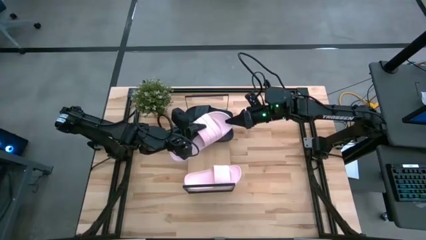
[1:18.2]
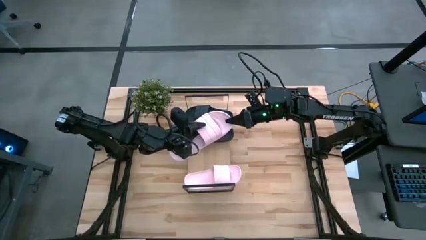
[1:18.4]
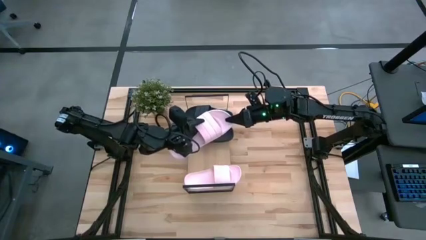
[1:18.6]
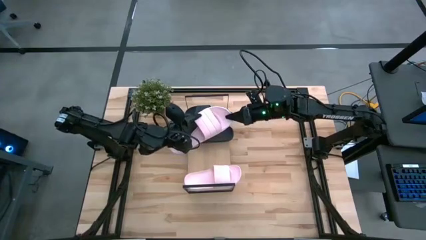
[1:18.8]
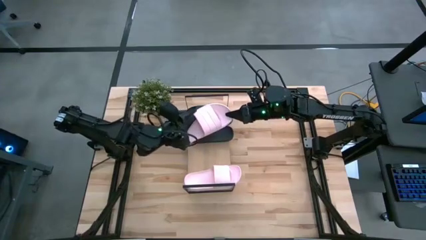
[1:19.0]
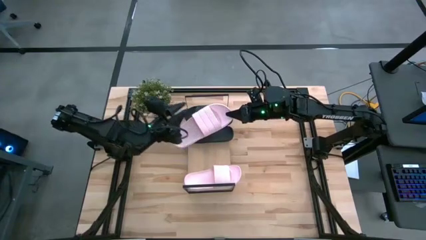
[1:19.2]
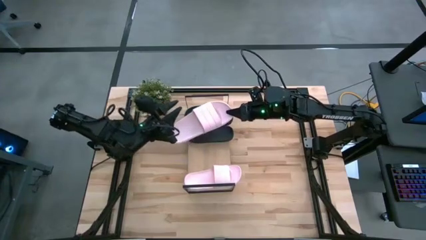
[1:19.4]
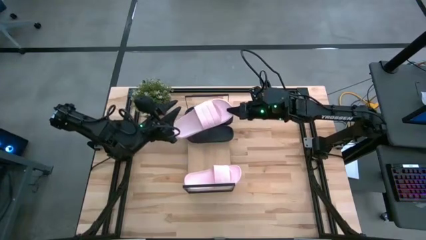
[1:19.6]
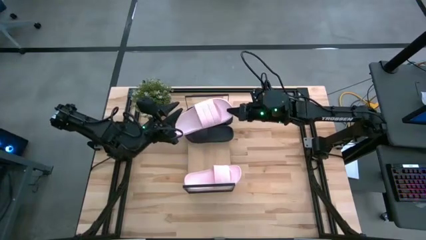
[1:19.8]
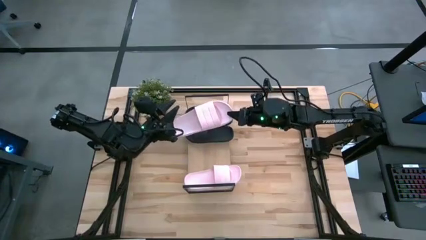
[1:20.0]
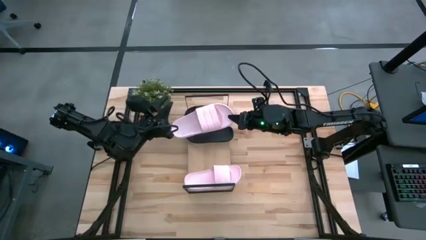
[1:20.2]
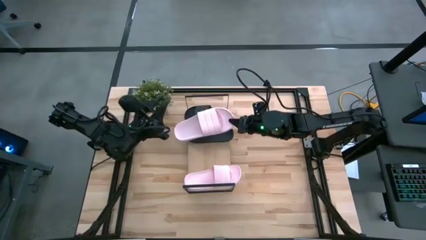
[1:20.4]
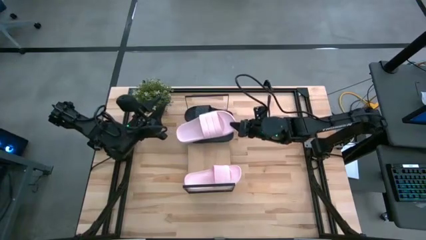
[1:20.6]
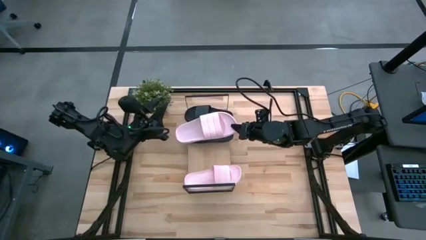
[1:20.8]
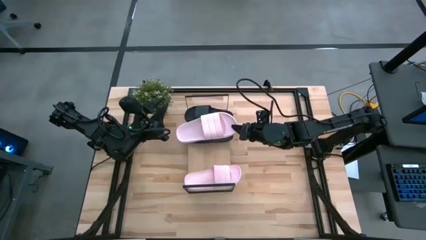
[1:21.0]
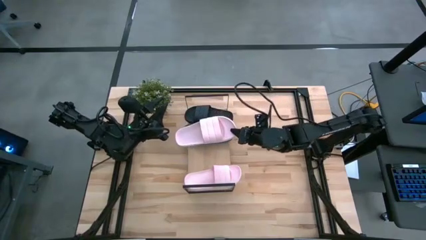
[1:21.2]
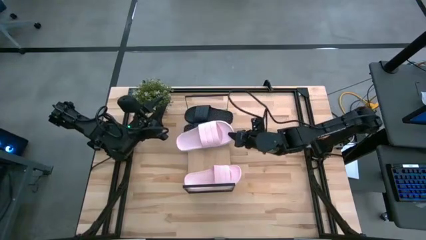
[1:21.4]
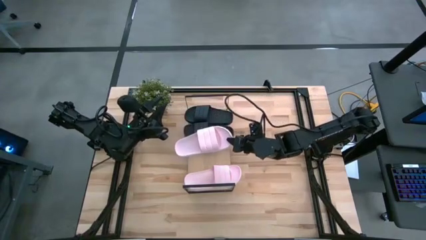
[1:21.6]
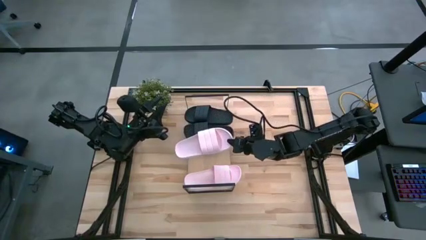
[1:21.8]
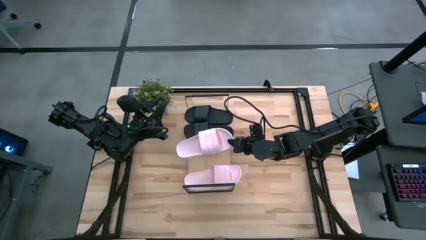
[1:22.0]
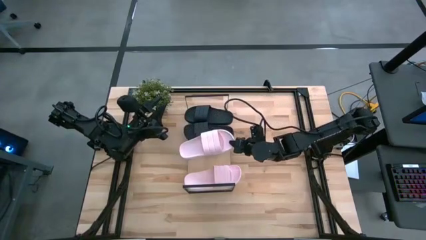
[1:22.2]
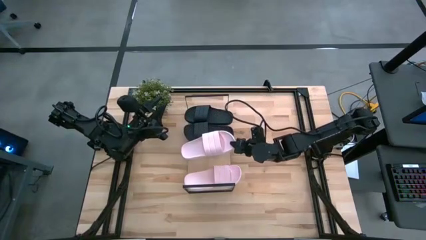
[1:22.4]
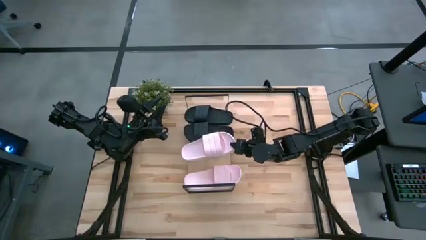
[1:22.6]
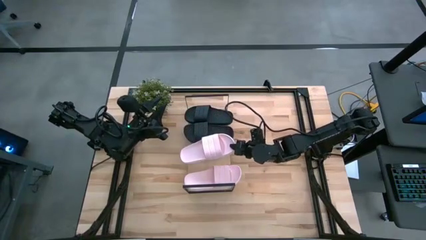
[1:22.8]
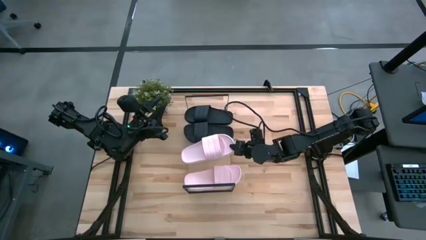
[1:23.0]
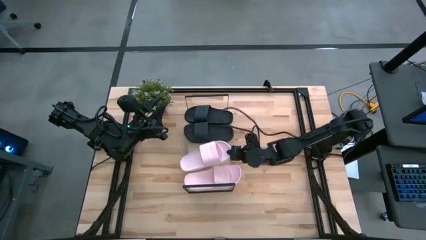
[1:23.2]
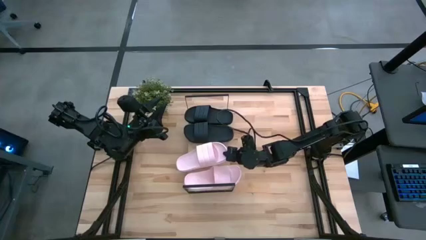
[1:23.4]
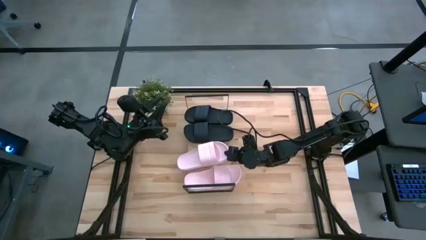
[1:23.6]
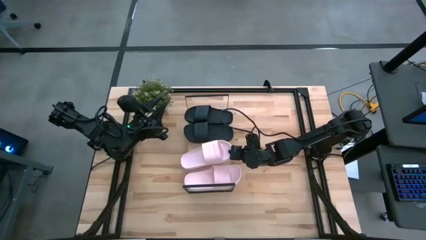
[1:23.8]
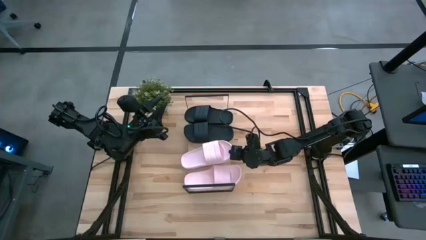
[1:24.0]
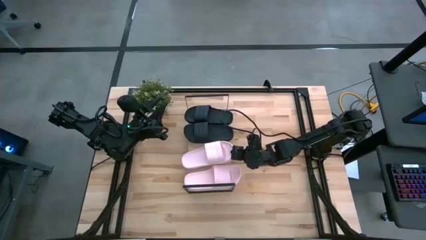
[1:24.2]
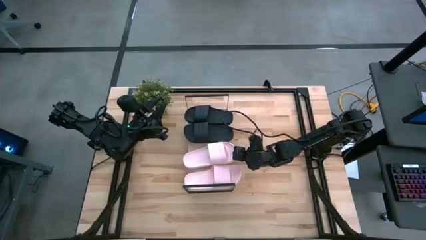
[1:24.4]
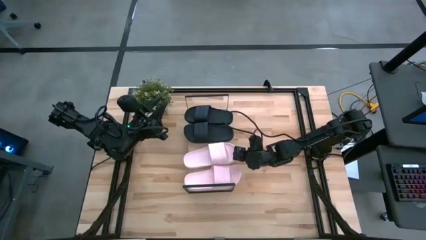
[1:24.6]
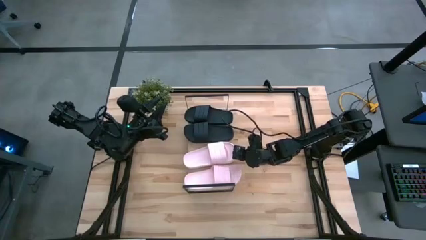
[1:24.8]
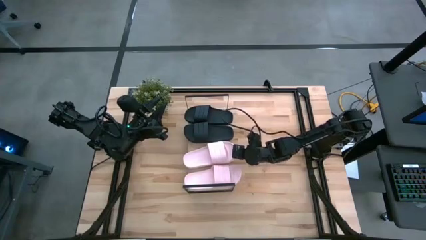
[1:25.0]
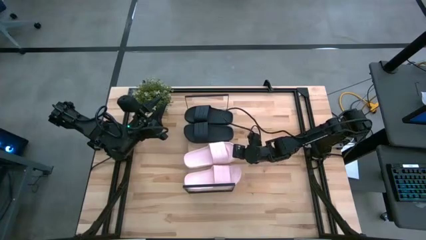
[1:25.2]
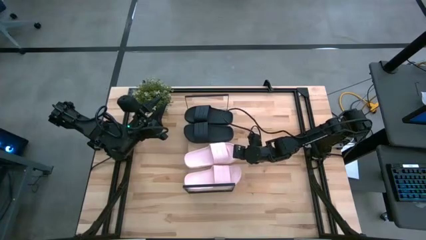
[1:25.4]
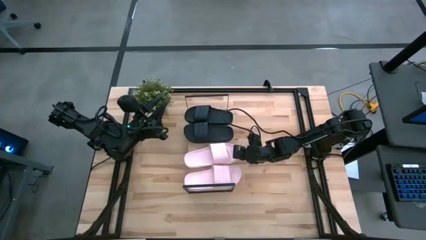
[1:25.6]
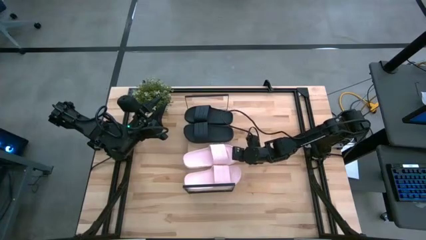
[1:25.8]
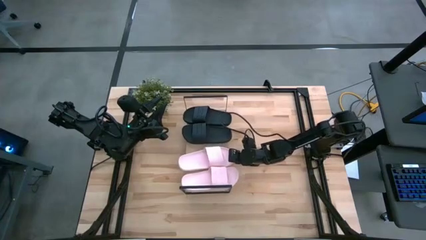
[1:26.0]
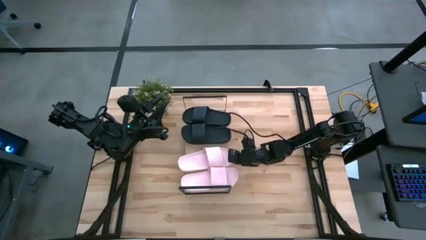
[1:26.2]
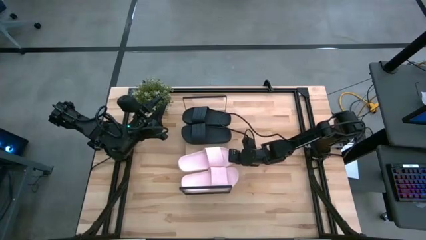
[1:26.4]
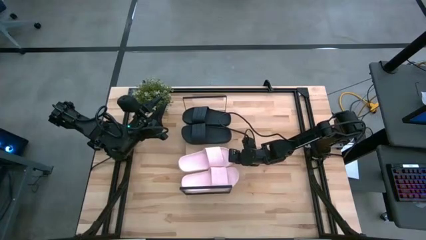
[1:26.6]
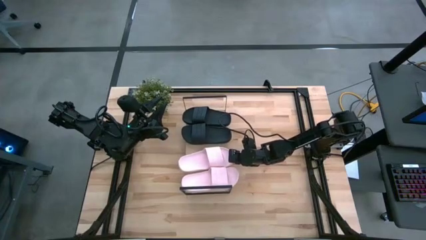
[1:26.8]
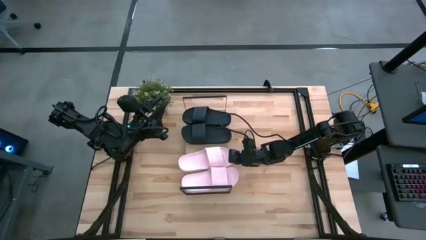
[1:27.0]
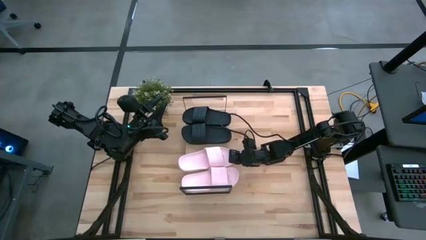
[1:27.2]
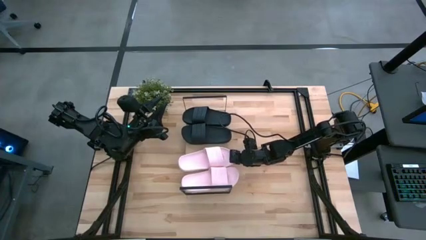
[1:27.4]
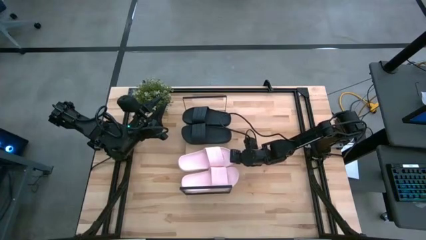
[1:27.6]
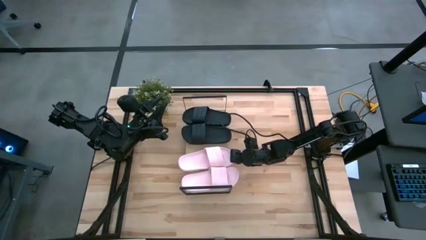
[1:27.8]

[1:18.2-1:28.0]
Task: Pick and place slides into the shelf
Put the pink slide on the shelf
